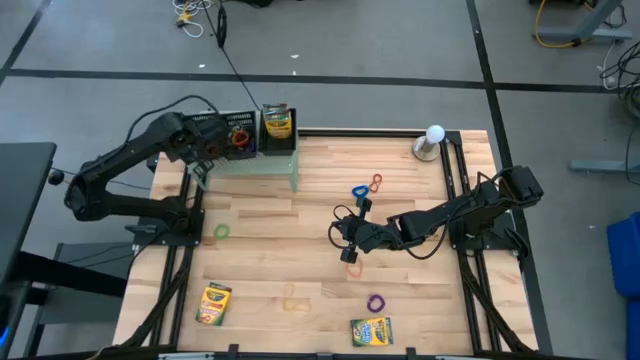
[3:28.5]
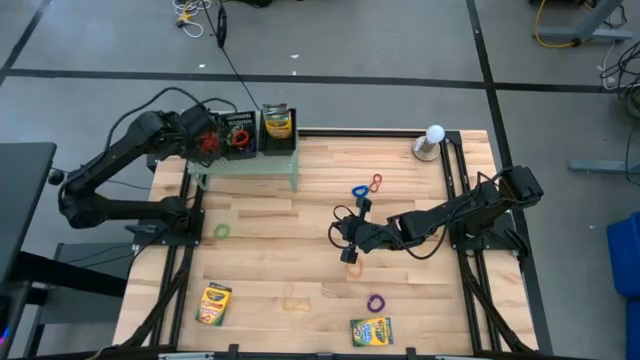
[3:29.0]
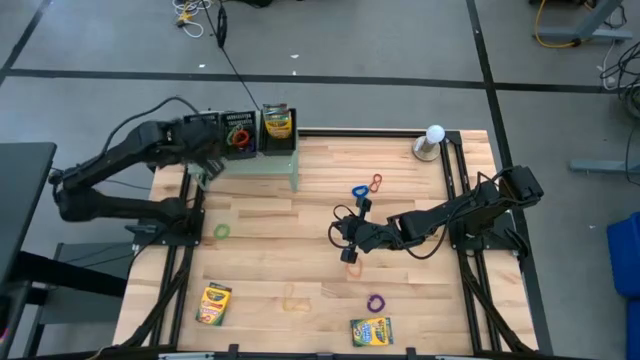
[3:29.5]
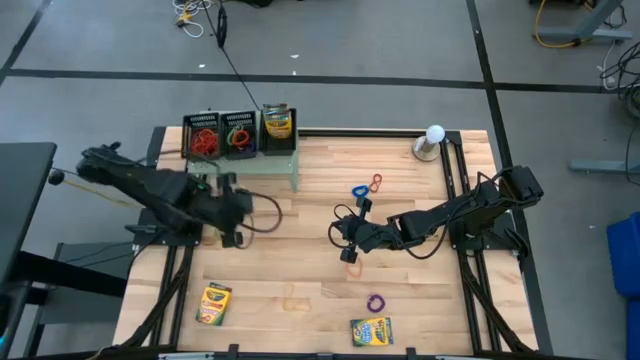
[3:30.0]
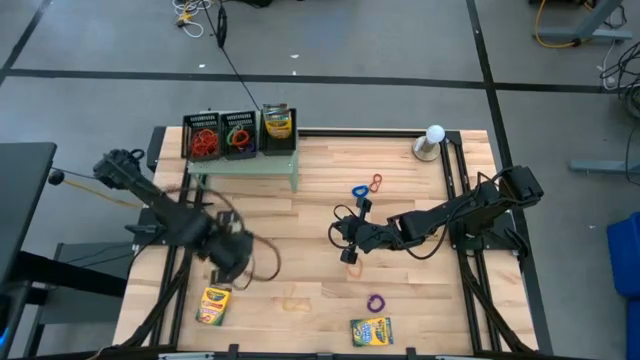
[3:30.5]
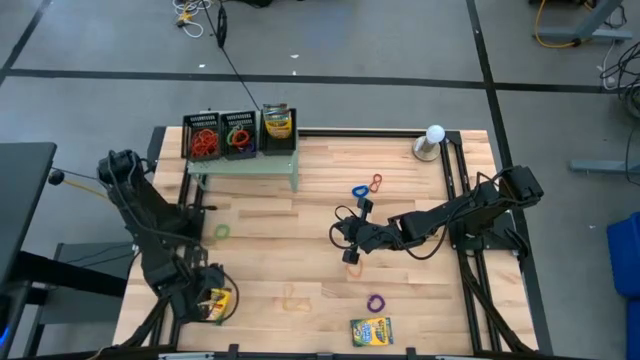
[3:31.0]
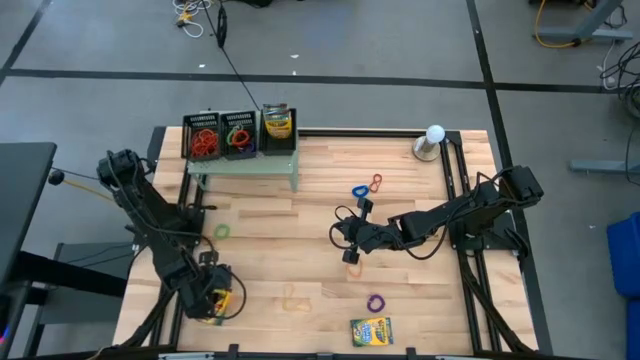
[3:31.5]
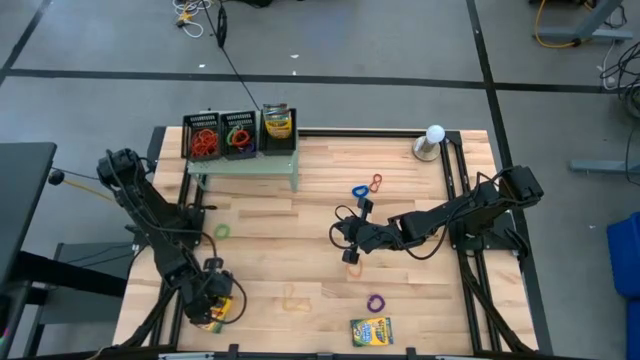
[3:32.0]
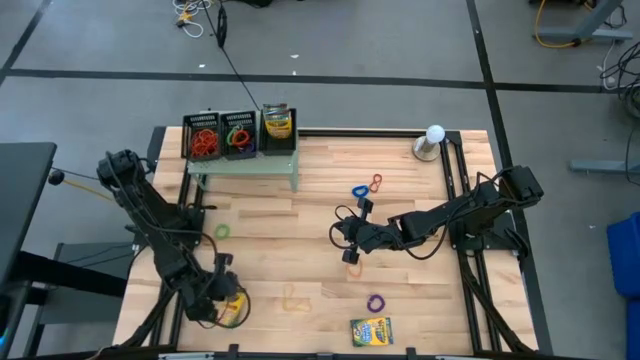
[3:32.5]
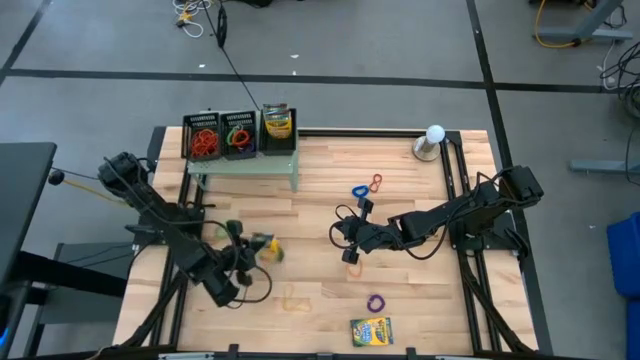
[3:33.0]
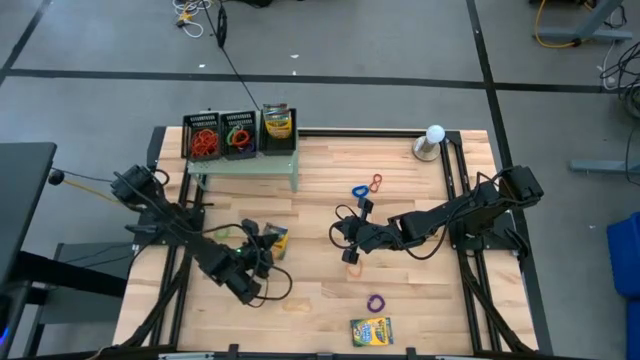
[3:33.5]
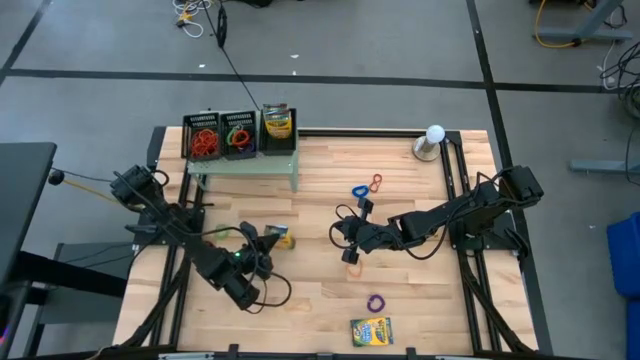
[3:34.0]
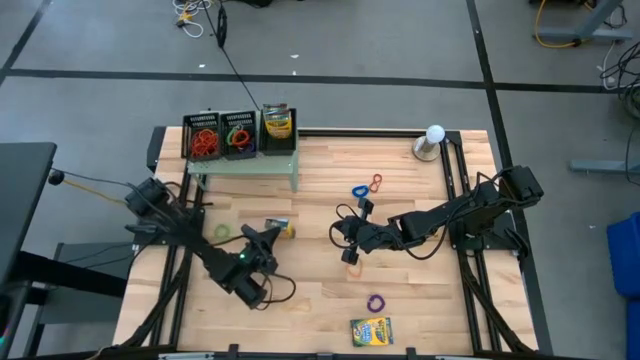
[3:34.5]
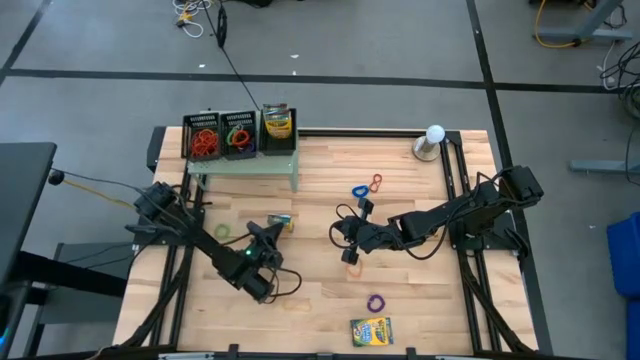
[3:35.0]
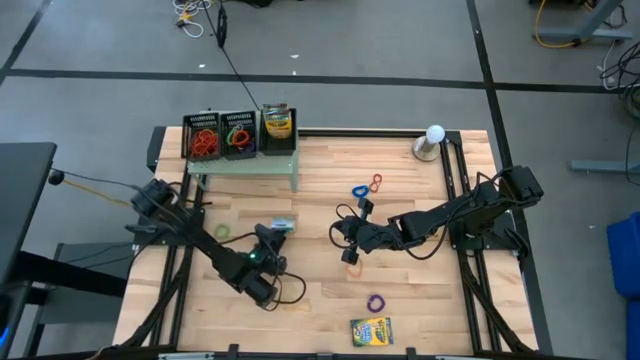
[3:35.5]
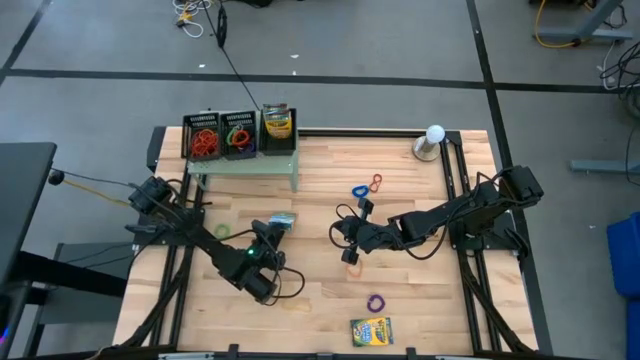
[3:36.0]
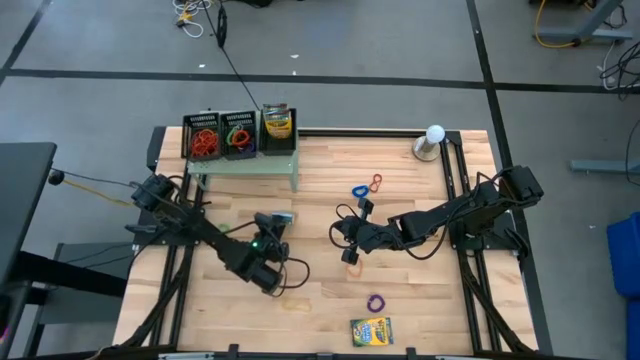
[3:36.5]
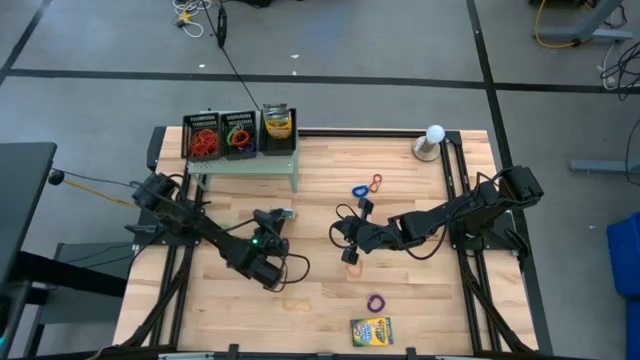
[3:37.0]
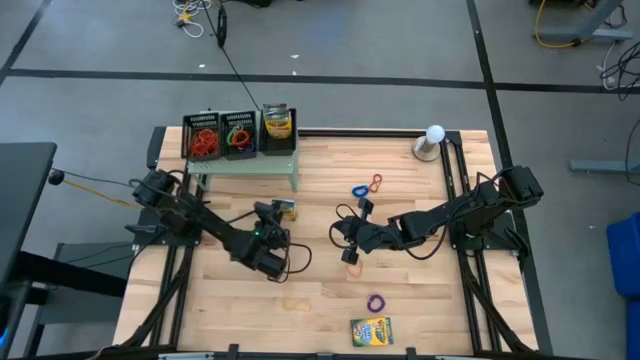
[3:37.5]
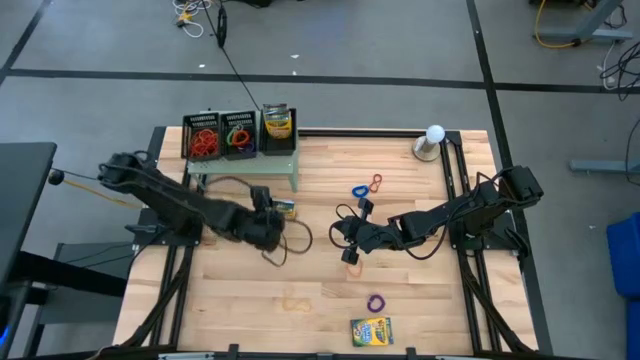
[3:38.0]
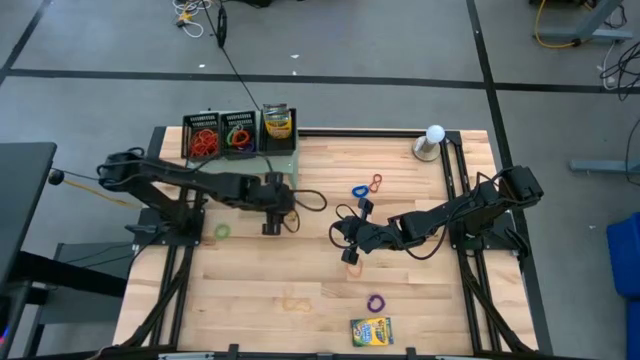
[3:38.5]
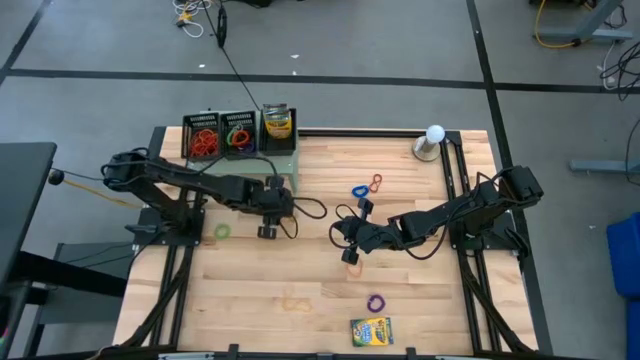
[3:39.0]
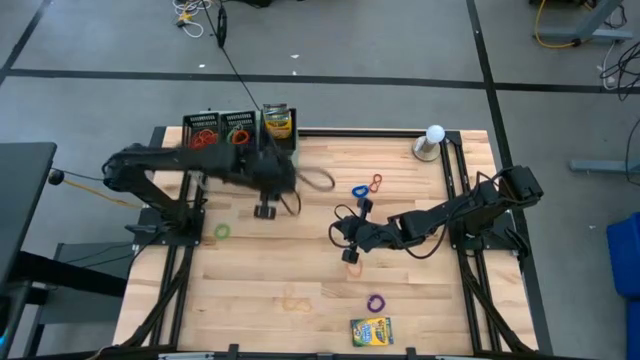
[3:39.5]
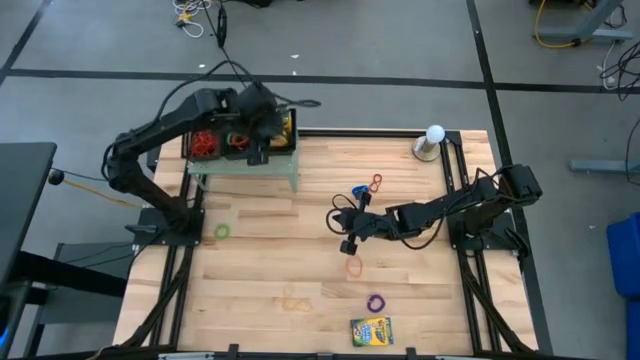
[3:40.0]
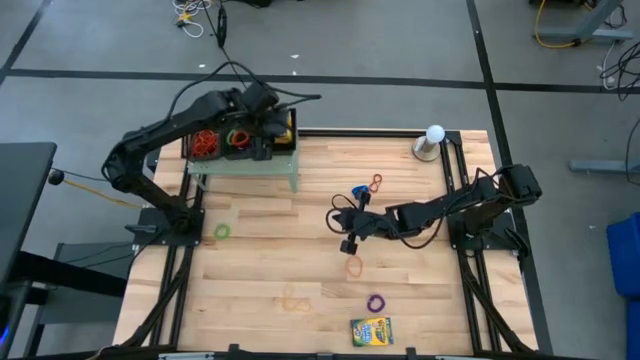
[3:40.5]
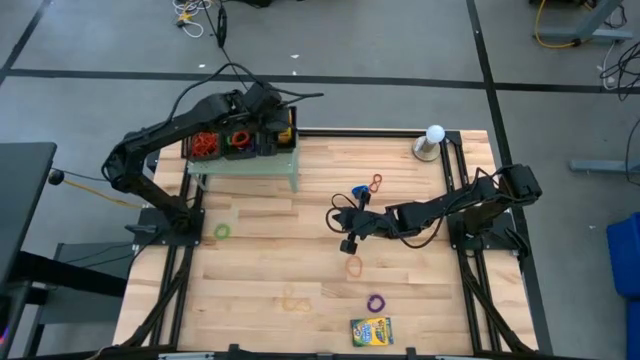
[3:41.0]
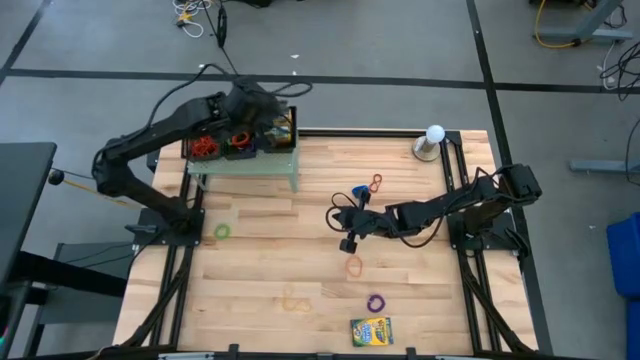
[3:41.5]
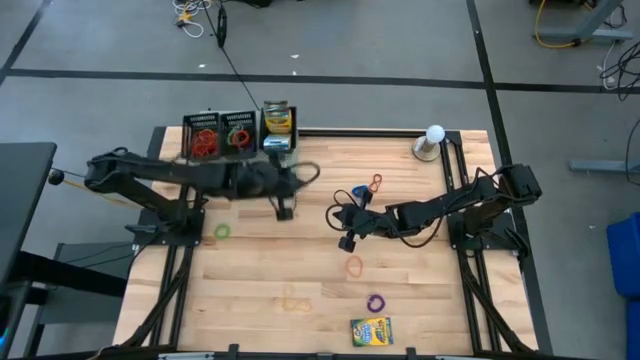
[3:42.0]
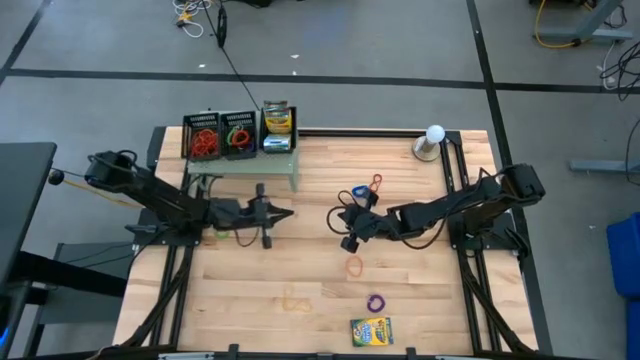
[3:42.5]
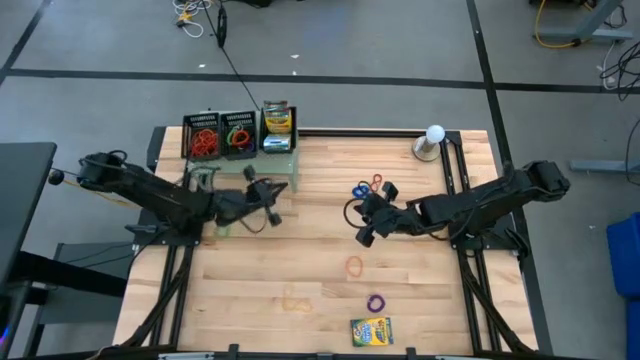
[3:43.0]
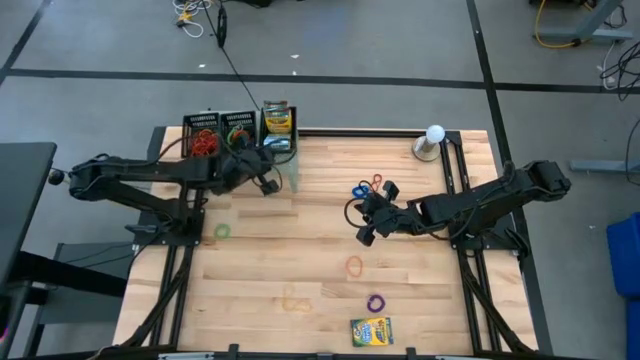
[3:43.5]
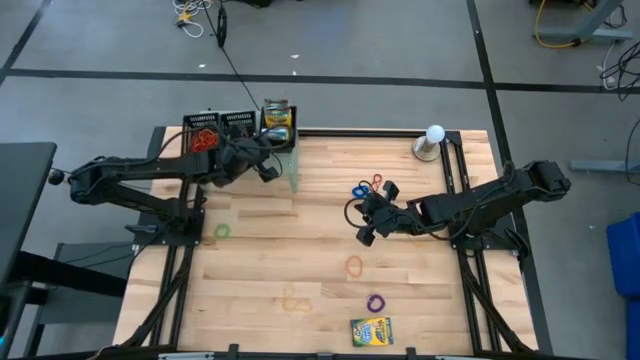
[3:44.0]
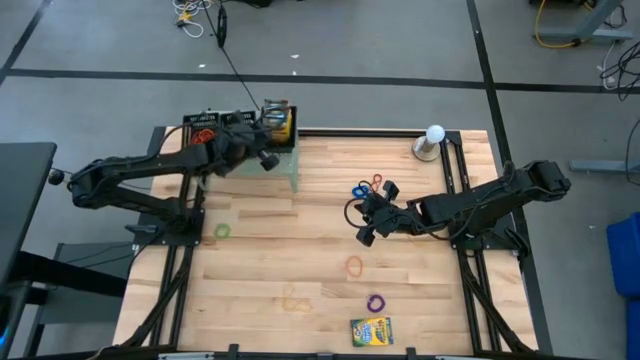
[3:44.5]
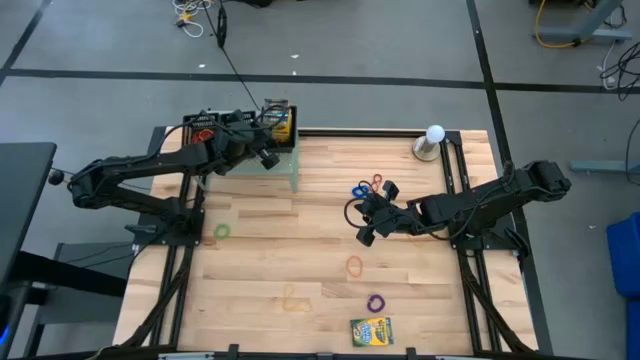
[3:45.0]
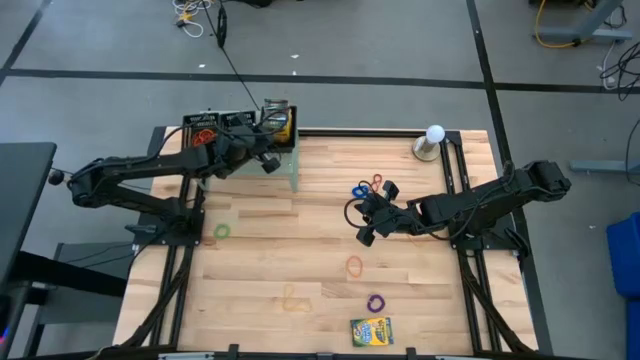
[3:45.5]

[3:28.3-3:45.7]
Task: Pick & Place Office Desk Supplies
Put the crayon box into the right black bin on the shelf

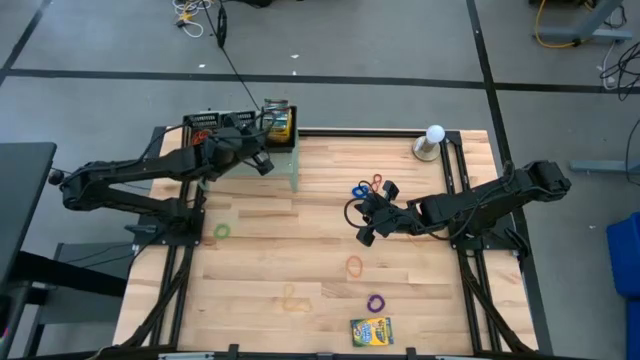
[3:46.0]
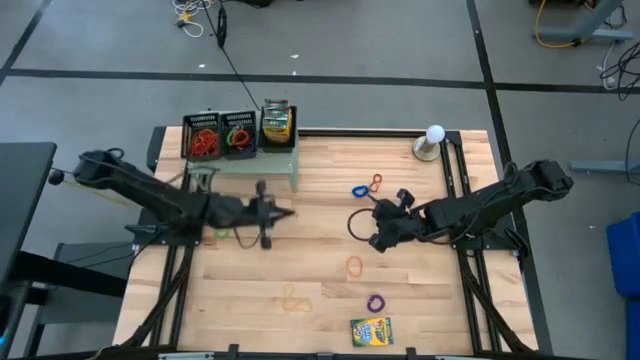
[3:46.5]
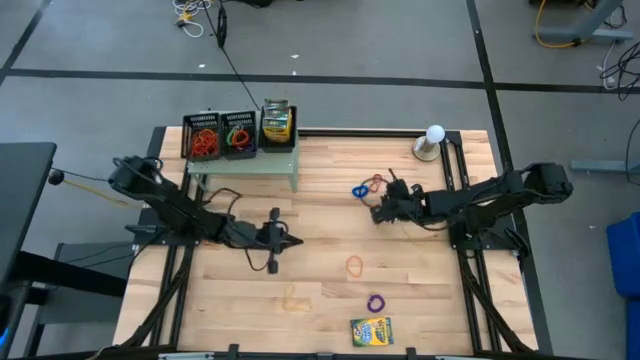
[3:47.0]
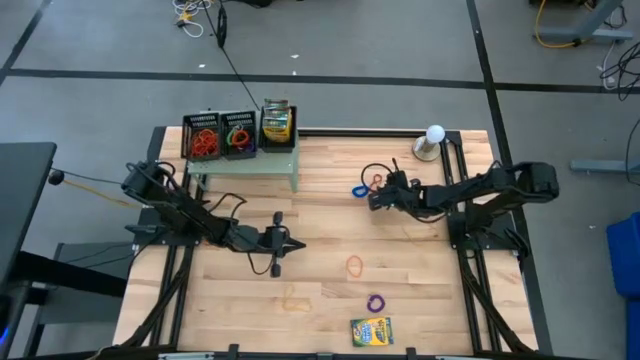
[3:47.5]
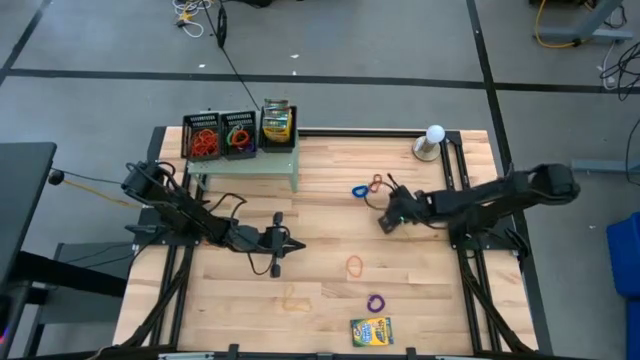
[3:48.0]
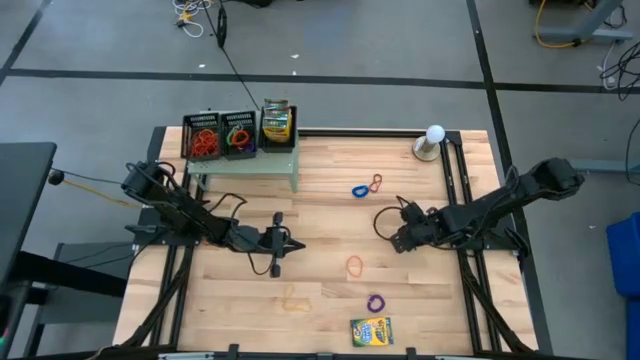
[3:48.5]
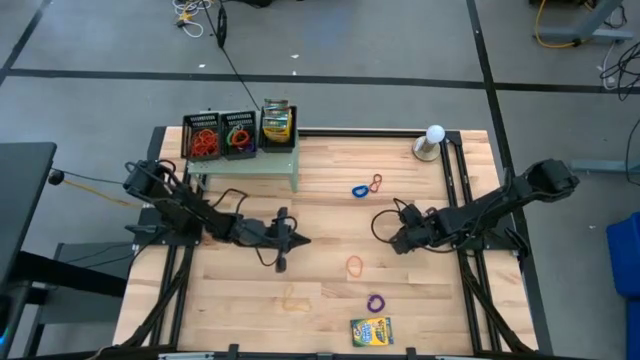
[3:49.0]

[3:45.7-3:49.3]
Put the yellow rubber band into the left black bin on the shelf

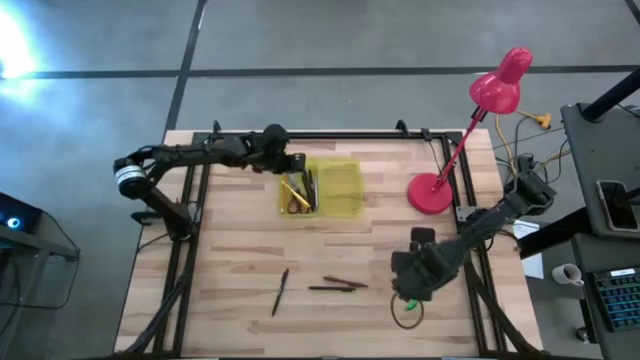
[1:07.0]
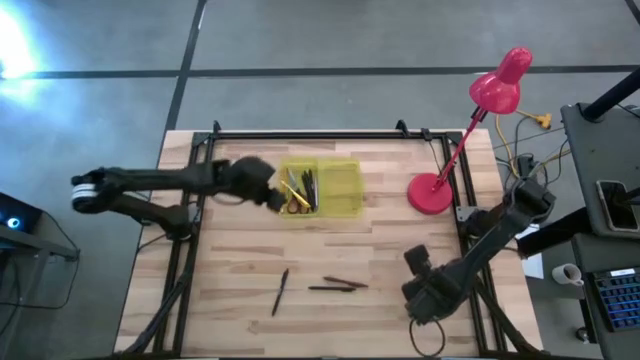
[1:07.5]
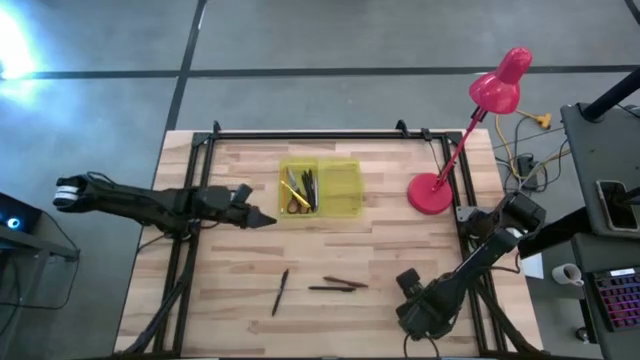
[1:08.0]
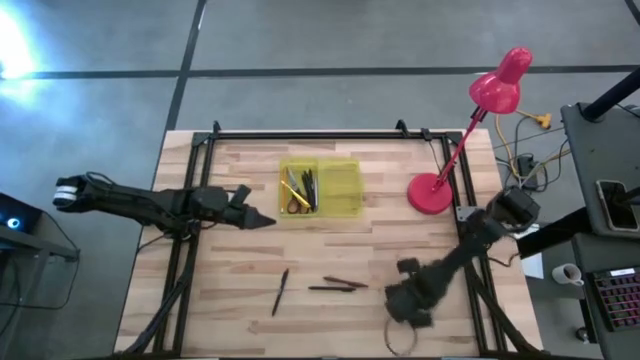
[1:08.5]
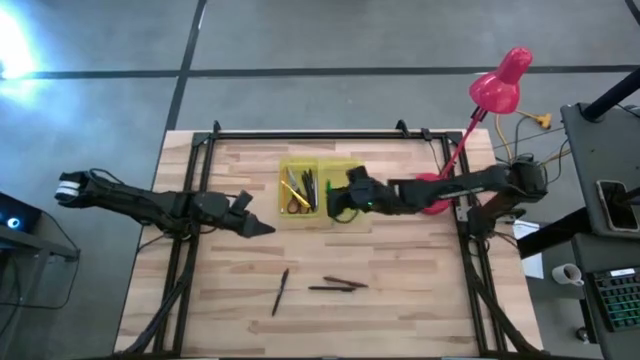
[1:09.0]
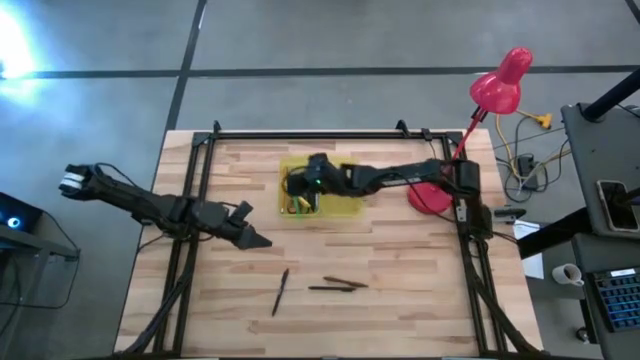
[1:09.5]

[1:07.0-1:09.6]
Task: Pick & place school supplies into a supply box
Put the green pen into the supply box
